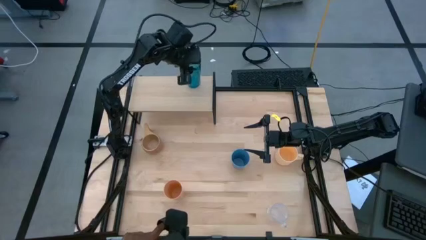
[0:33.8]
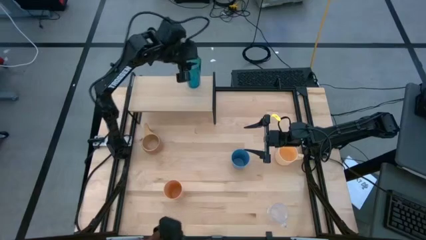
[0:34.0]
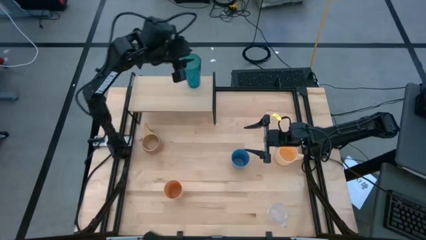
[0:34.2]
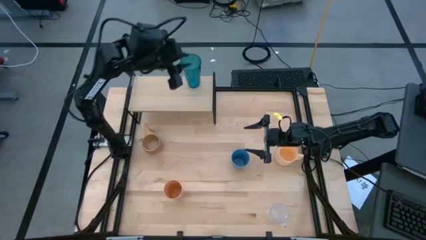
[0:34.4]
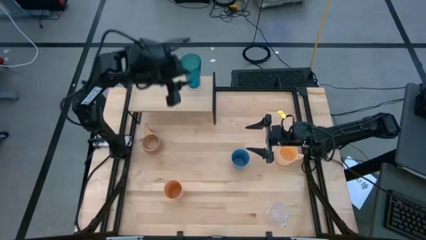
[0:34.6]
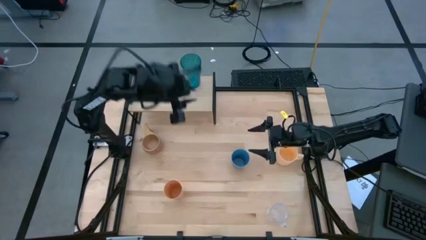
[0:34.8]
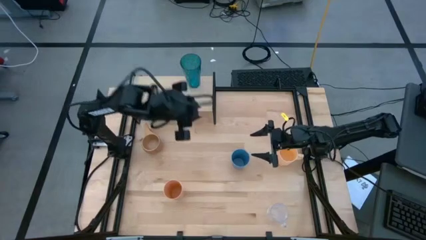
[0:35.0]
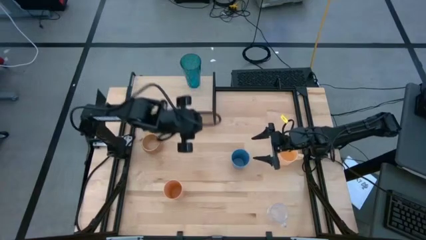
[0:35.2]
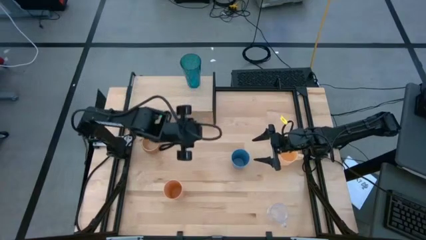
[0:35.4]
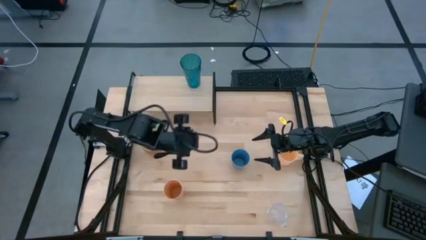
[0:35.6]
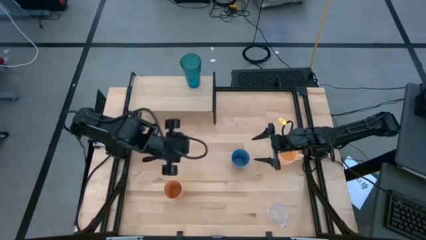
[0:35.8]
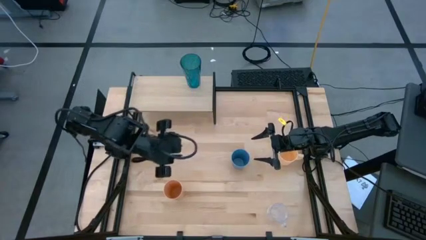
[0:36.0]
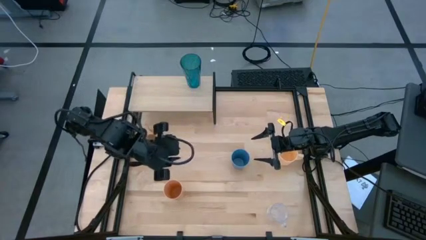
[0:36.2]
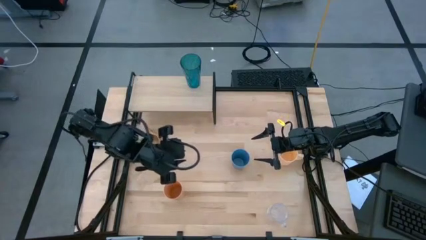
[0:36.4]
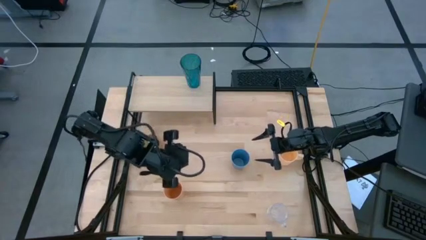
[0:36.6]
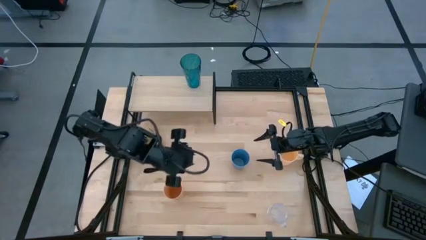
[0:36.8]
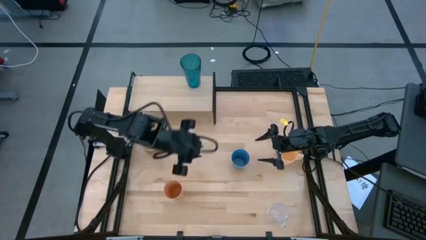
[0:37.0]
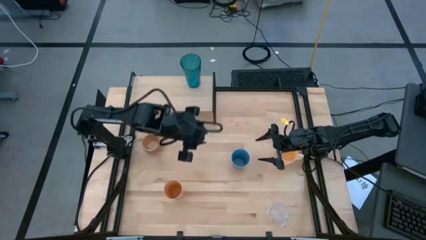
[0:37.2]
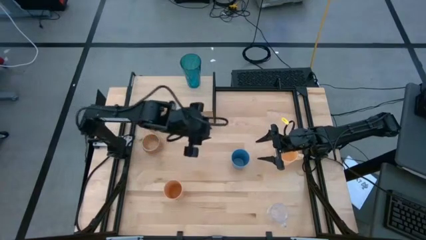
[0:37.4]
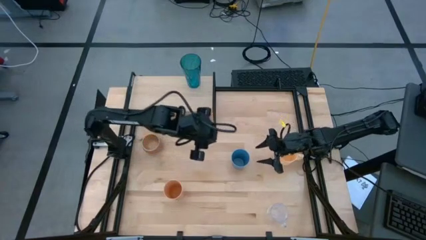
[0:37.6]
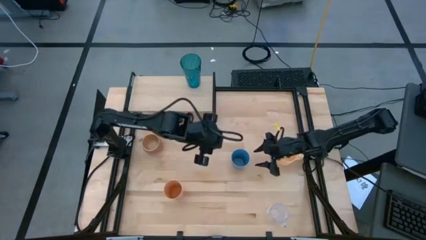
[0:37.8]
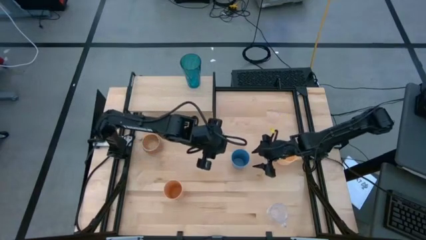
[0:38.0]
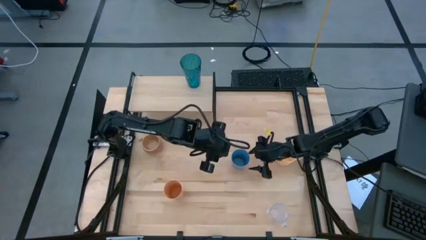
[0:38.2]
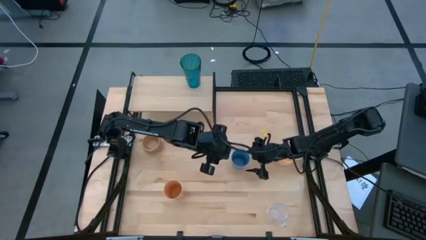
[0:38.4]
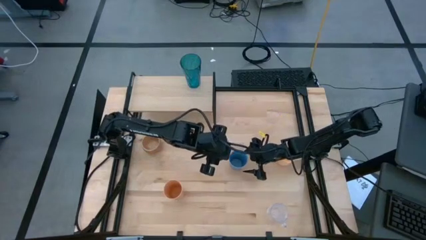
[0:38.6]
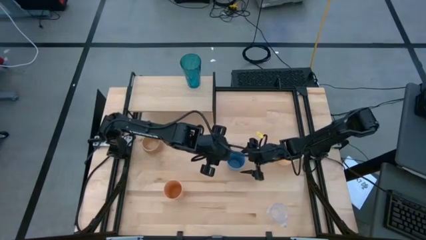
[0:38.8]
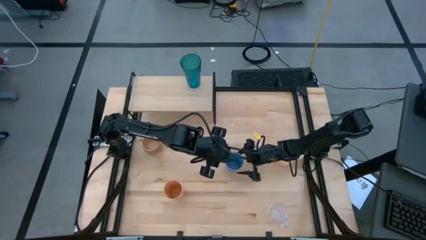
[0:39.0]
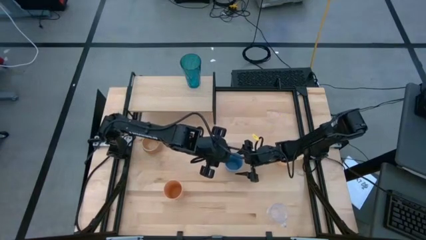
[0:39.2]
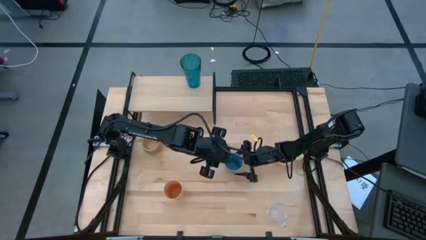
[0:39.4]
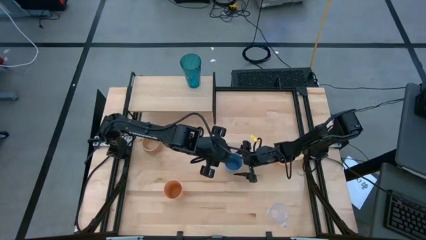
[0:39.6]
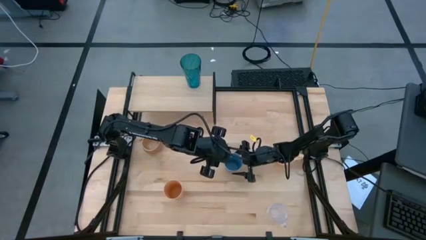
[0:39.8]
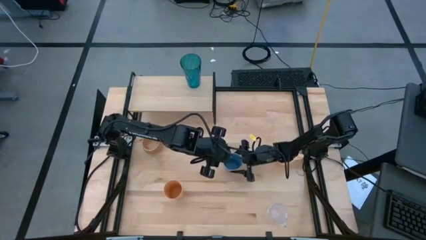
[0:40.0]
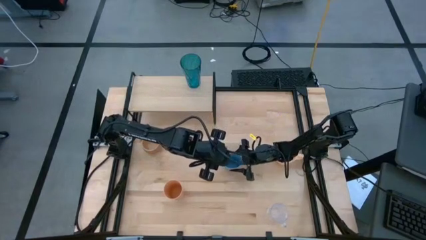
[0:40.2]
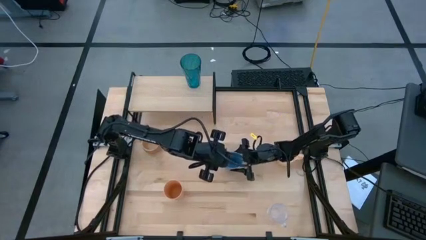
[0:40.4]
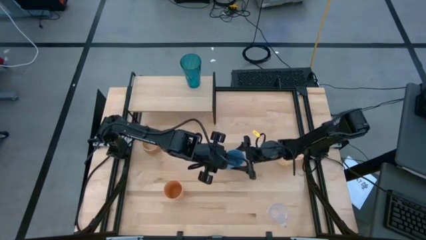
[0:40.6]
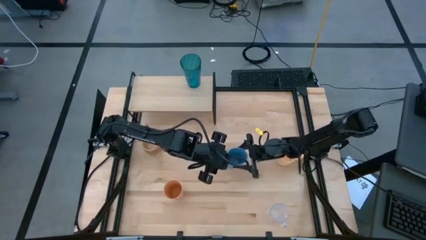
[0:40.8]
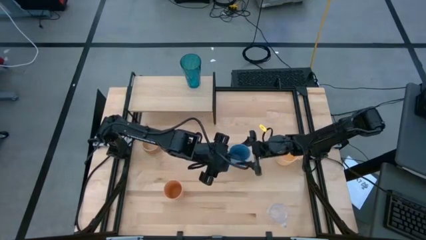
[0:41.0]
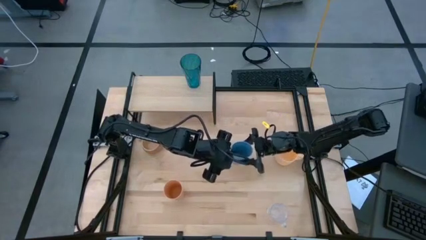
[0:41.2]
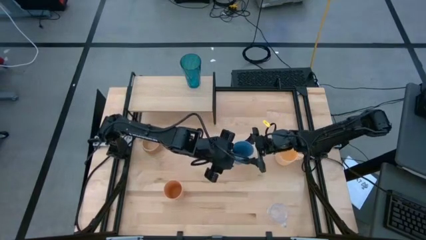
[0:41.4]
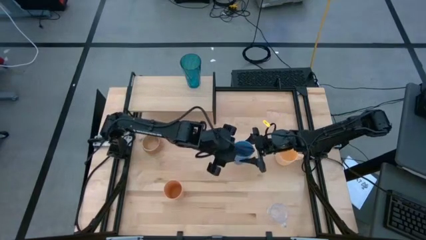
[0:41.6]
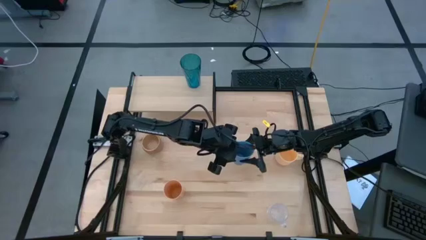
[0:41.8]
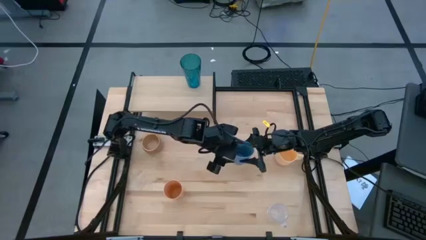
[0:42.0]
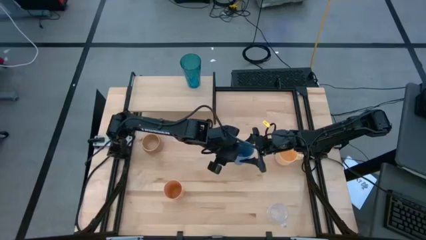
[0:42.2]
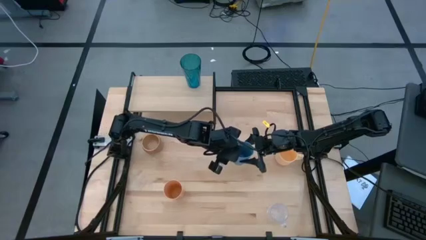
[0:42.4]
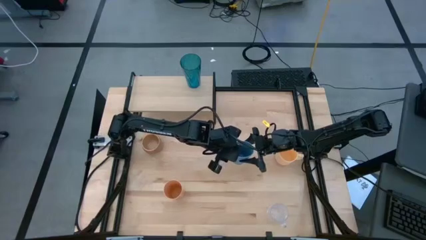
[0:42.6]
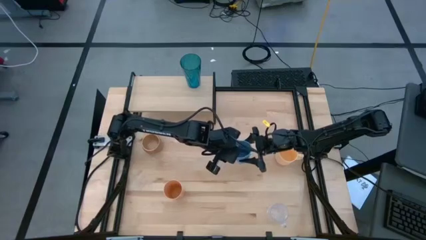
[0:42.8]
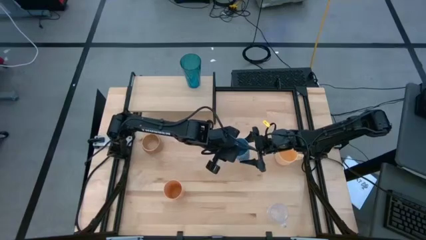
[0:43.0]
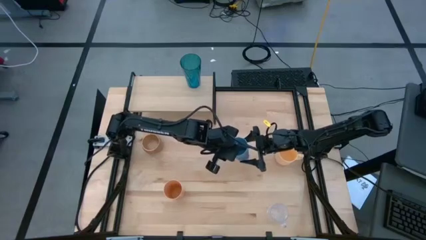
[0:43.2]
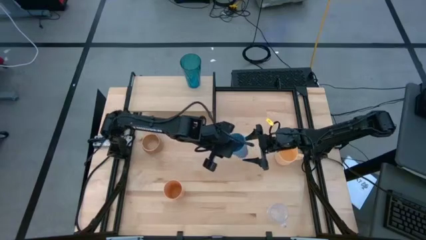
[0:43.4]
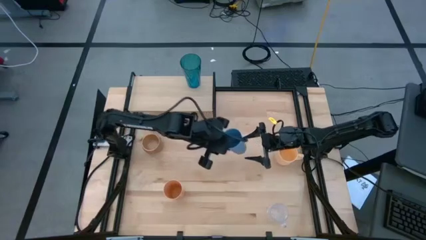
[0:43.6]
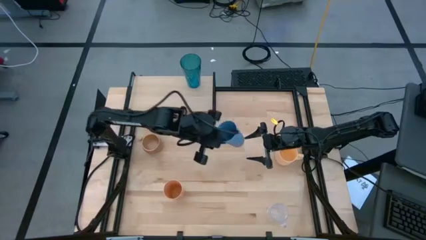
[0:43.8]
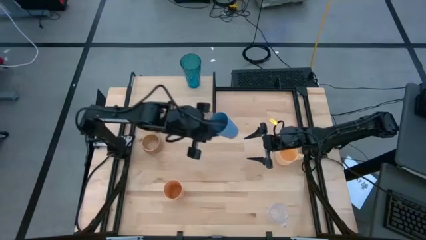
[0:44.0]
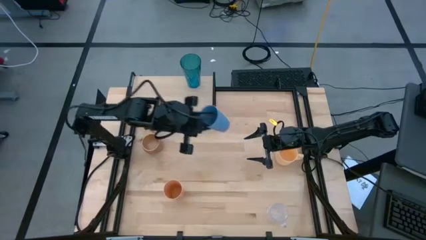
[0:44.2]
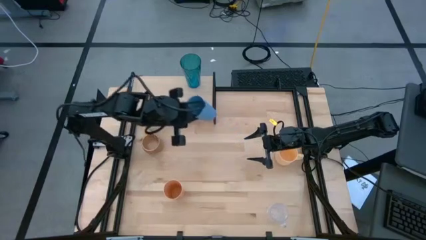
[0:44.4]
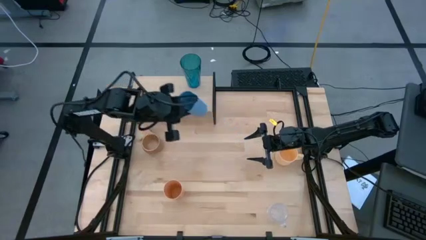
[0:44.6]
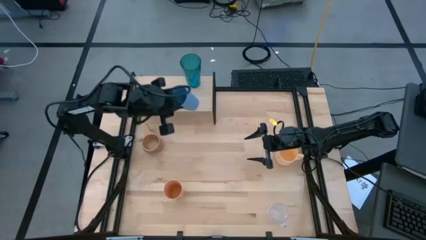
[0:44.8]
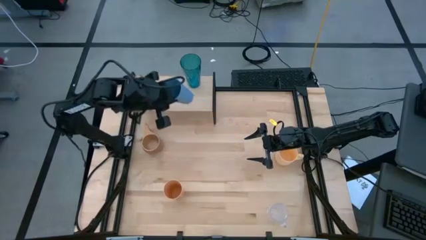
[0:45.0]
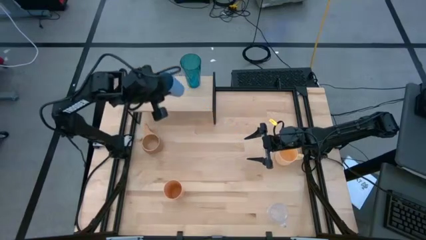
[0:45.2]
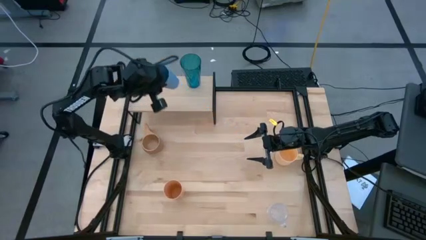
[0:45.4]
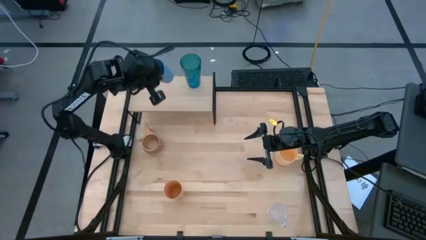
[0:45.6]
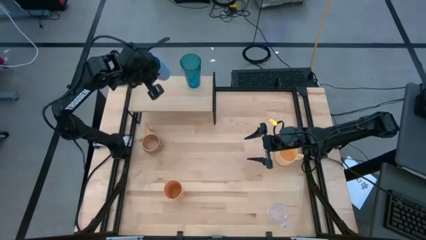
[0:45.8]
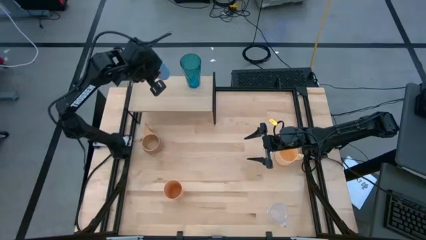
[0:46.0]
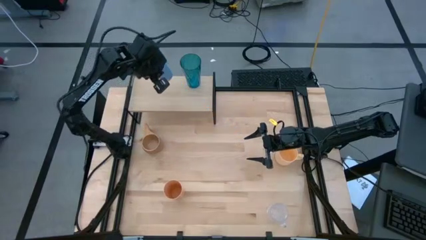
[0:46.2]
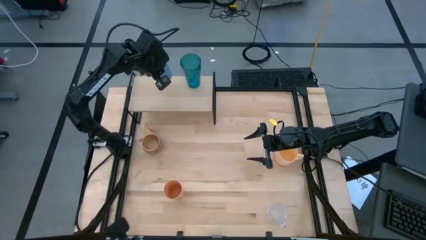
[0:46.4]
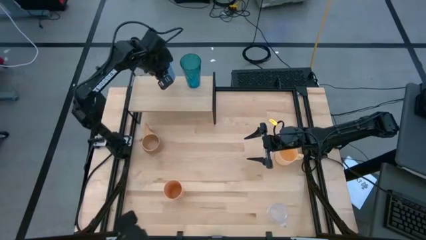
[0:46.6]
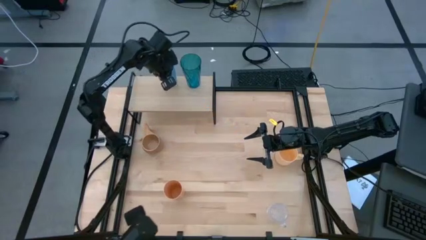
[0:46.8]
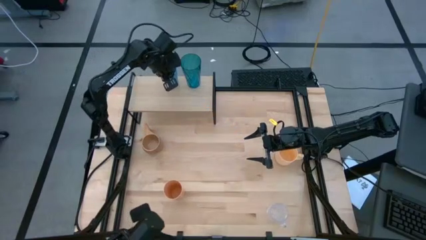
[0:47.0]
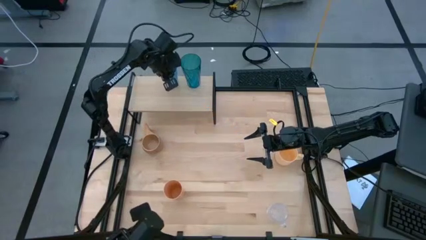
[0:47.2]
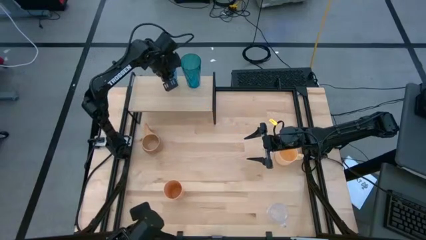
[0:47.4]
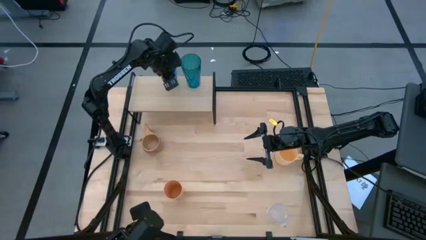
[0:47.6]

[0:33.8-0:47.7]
Task: Stack small to large cups/mugs on shelf
Put the blue cup on the shelf
